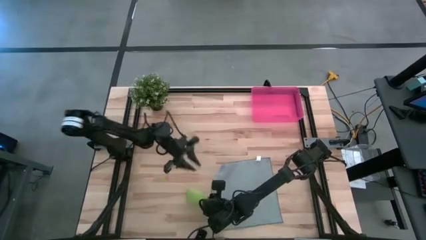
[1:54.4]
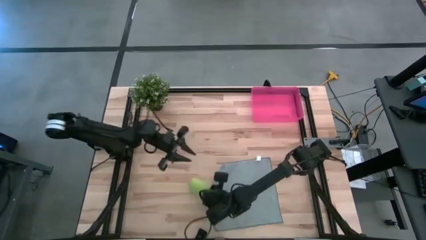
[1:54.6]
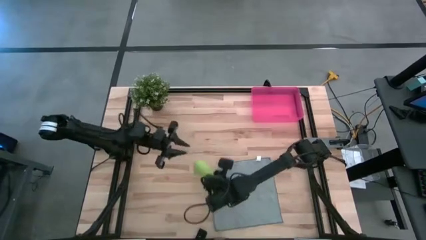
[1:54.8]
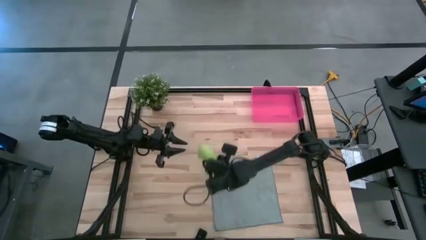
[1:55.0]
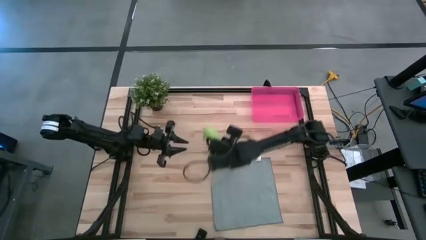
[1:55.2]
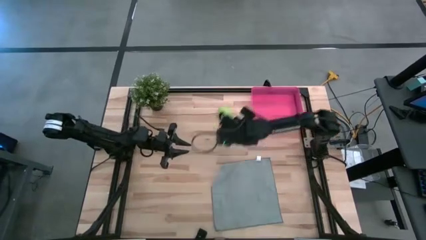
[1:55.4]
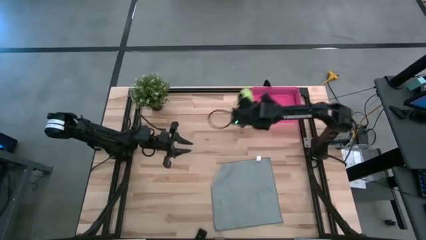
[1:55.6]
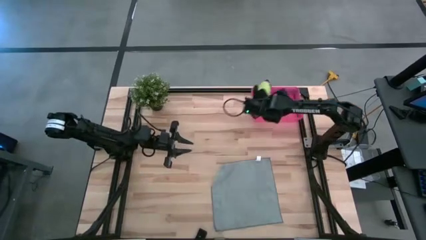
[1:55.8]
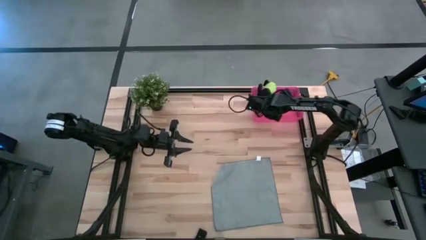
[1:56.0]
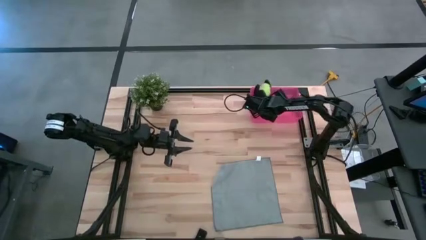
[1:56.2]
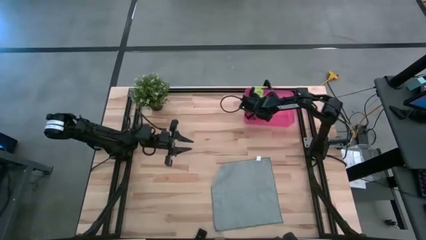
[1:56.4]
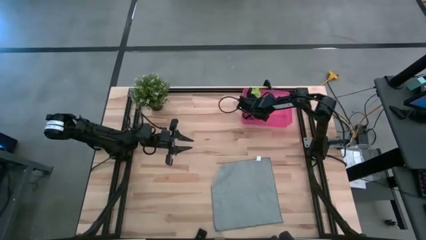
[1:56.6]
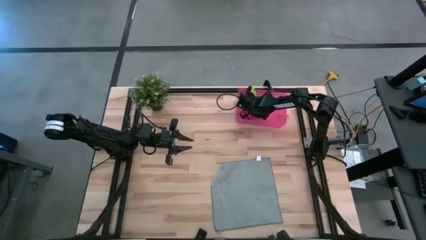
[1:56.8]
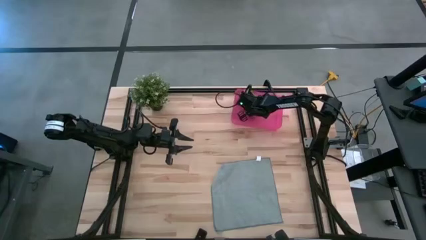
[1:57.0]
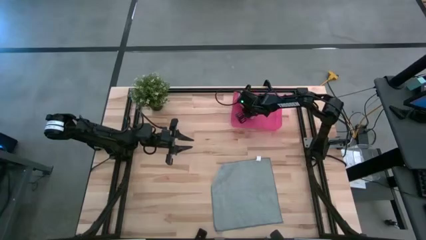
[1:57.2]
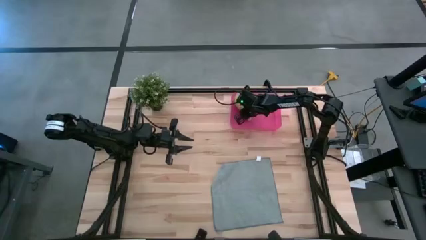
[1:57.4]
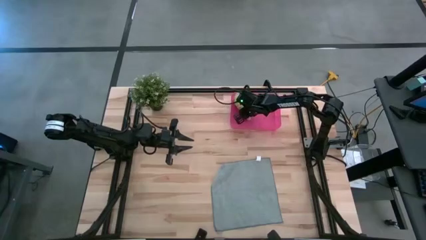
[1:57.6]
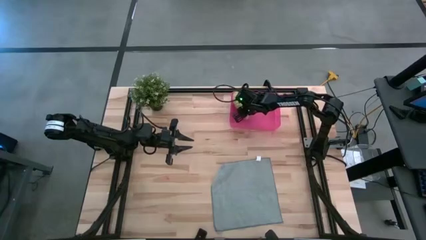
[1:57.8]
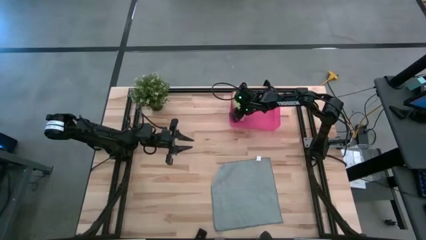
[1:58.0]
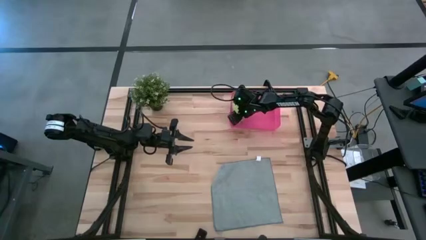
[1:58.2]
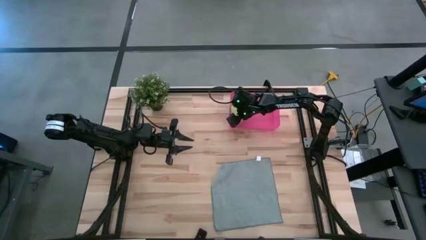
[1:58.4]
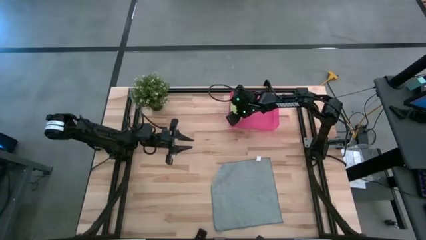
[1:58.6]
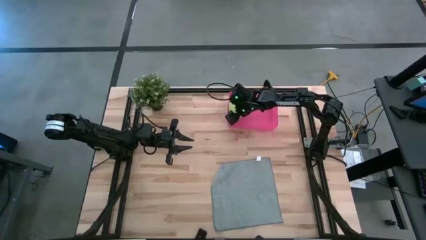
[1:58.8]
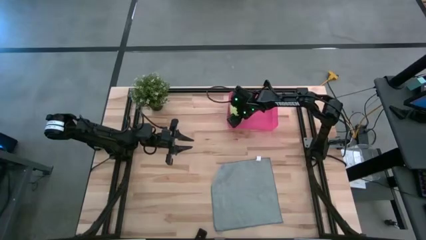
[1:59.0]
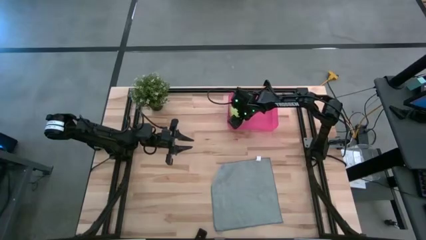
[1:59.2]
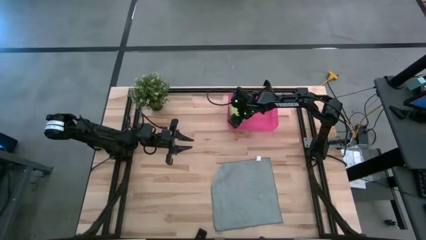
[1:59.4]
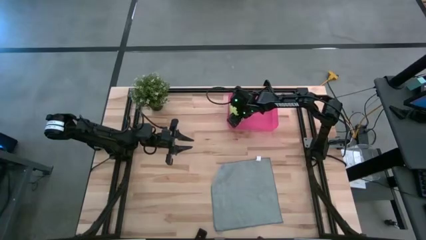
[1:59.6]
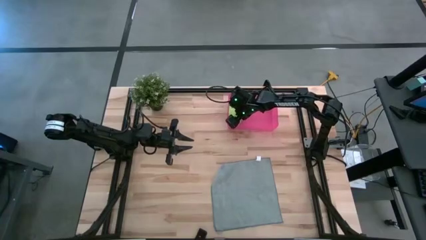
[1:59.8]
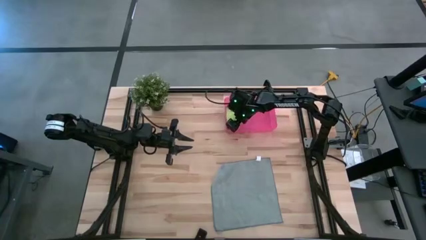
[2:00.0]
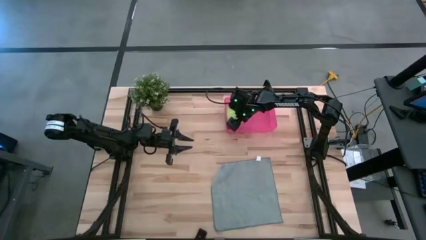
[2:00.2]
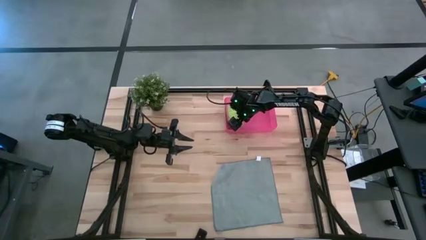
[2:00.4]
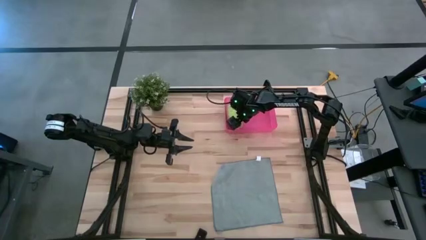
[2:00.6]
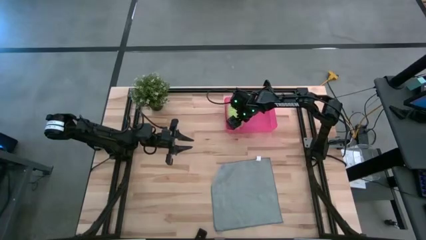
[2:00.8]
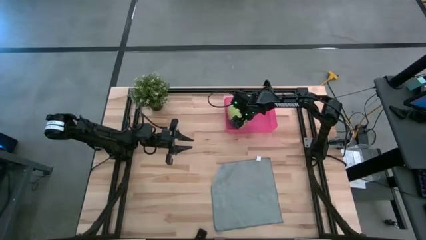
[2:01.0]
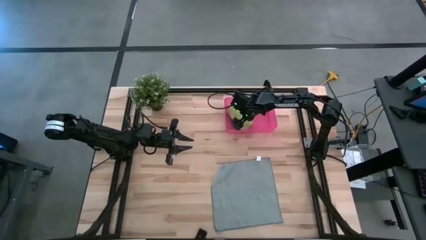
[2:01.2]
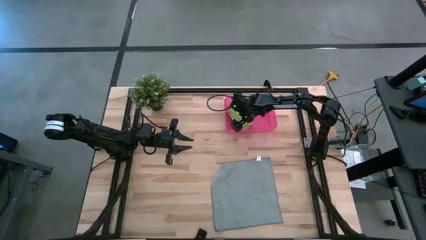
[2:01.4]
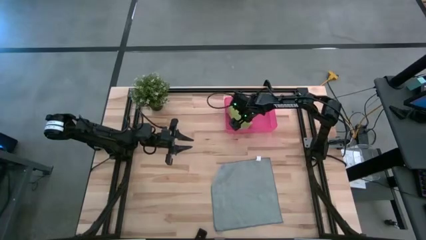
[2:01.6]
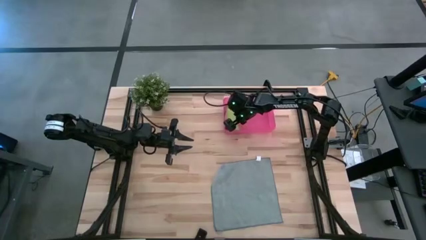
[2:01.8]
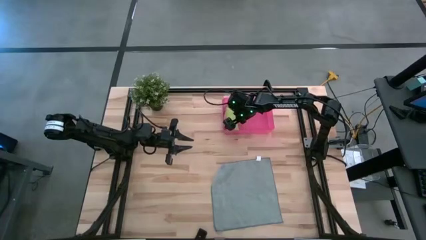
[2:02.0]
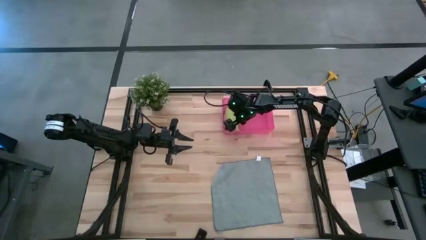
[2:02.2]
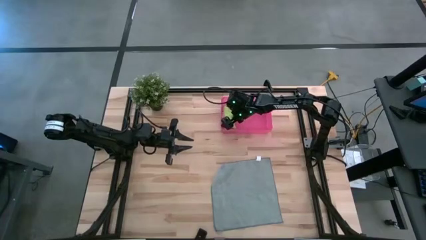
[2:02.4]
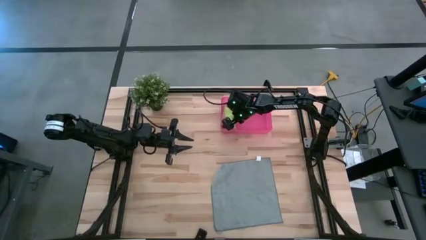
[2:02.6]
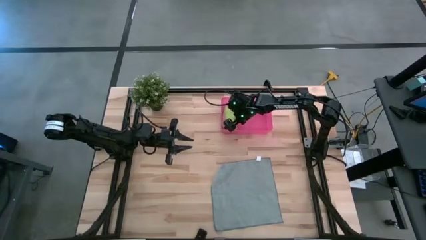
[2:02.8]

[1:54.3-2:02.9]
Task: Roll microfiber towels into tight, uniform cylinder then place into a basket
Put the rolled green microfiber cloth into the pink bin

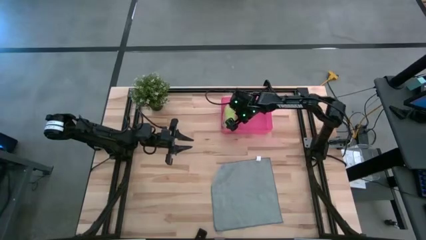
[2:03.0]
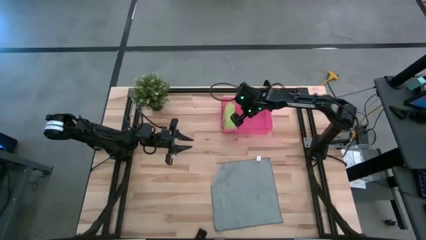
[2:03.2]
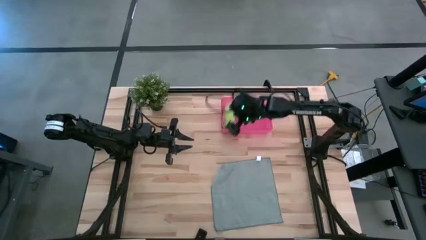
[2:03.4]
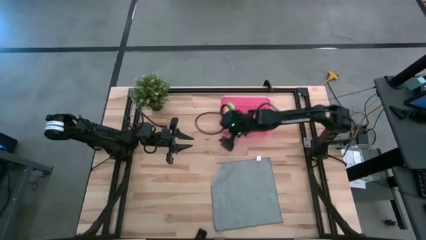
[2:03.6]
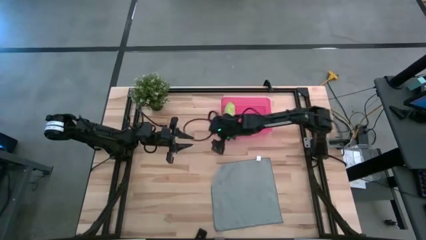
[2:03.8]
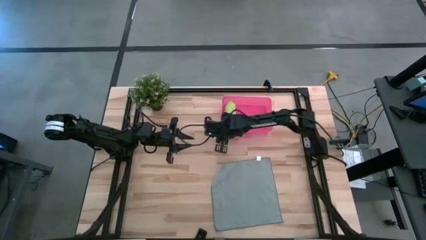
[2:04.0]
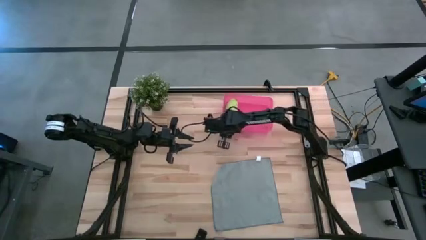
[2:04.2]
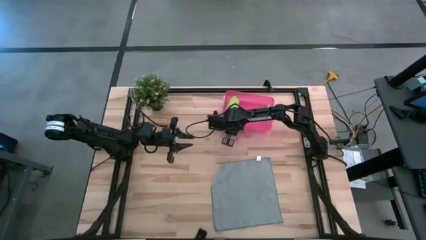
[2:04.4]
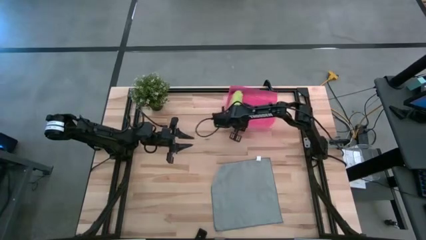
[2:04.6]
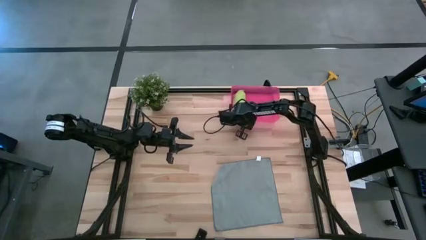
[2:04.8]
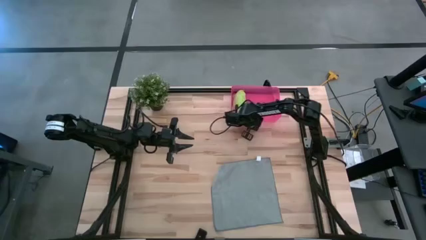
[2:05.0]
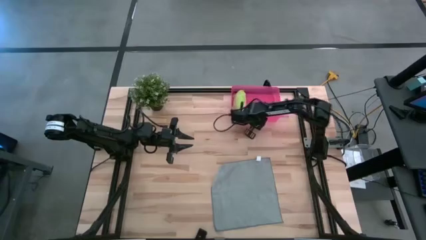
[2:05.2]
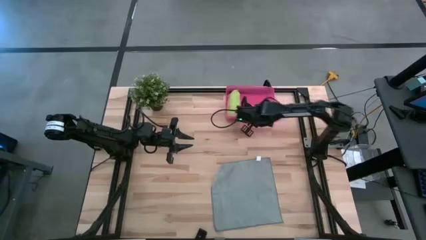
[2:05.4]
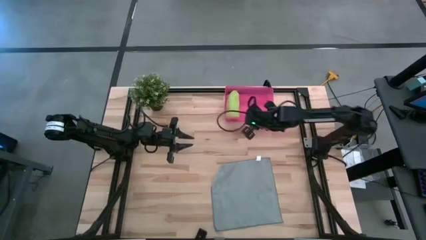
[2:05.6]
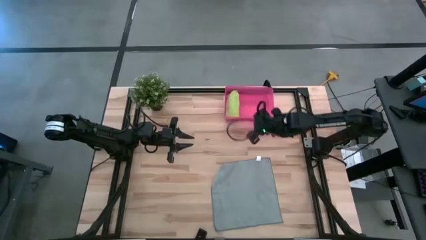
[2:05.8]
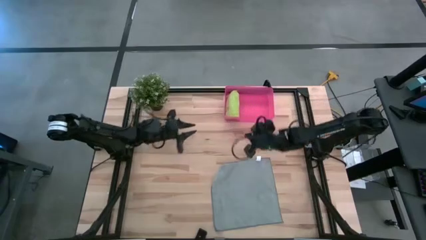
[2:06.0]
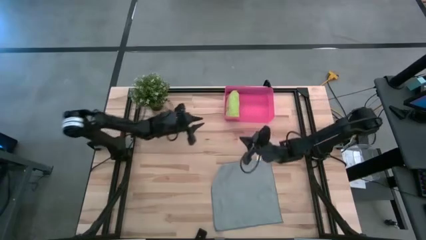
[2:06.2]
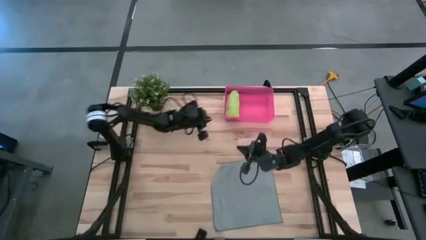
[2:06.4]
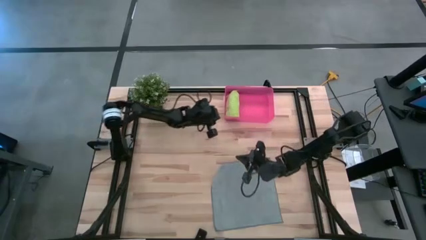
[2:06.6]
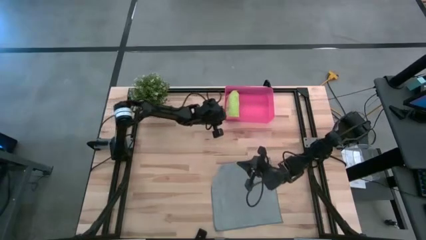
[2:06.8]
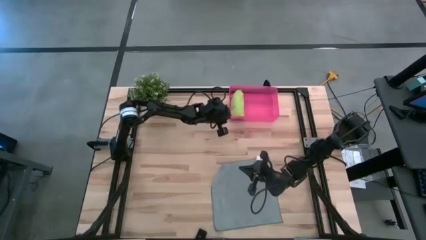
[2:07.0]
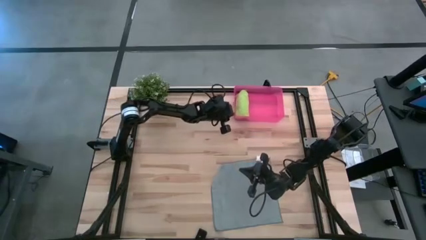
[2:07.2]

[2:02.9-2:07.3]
Adjust the pink bin

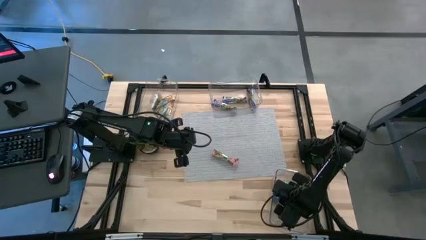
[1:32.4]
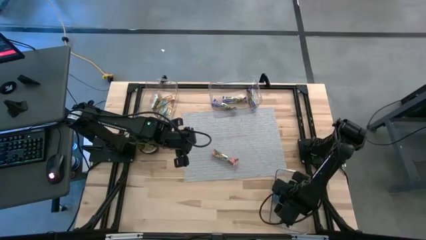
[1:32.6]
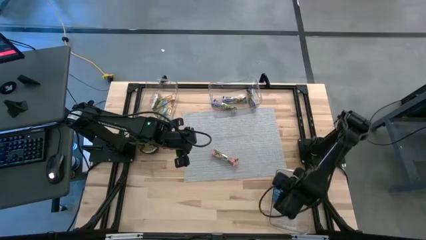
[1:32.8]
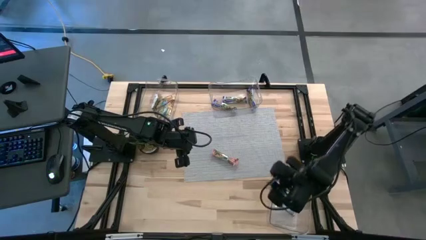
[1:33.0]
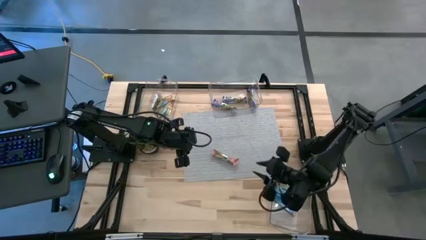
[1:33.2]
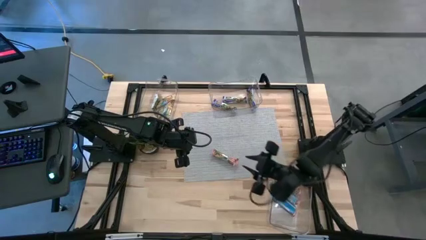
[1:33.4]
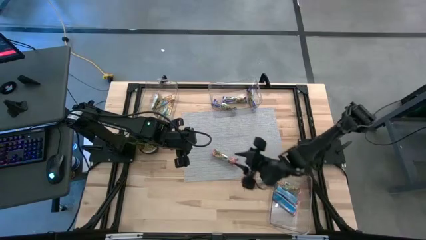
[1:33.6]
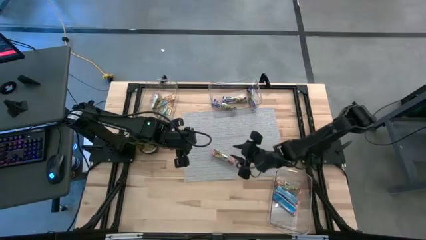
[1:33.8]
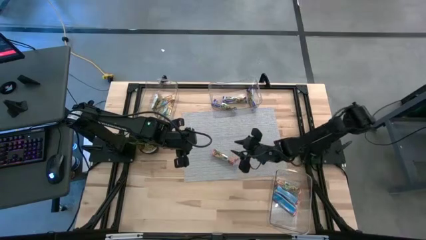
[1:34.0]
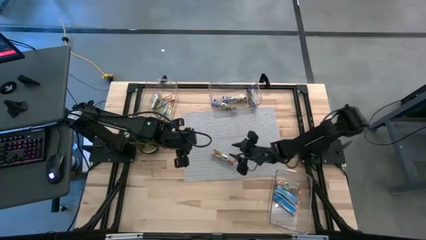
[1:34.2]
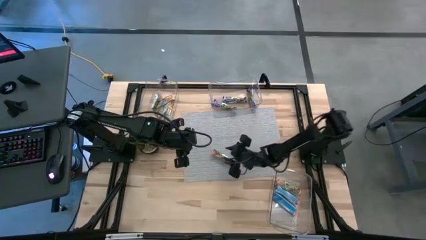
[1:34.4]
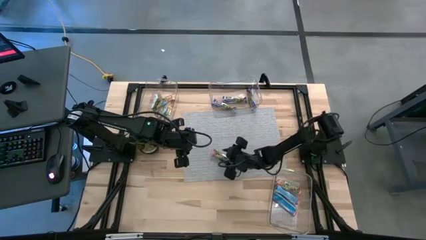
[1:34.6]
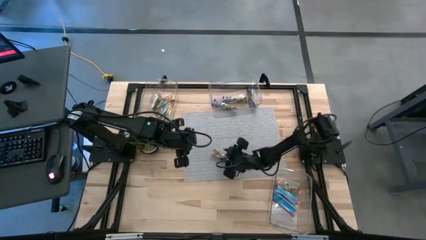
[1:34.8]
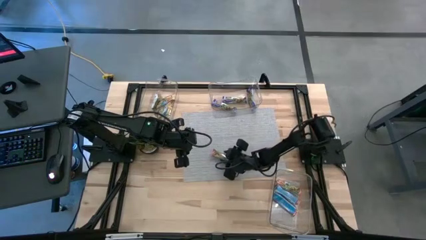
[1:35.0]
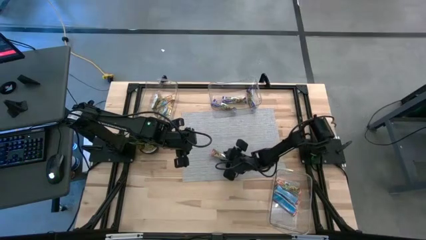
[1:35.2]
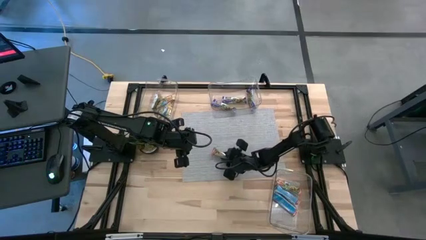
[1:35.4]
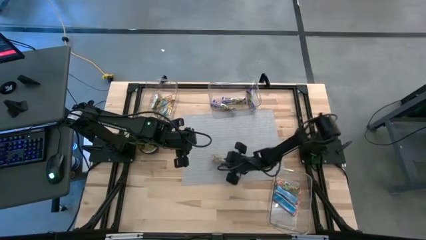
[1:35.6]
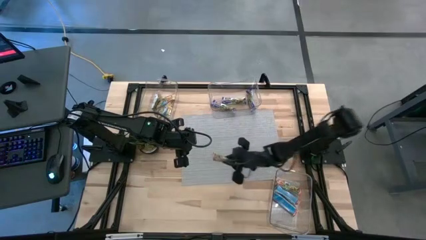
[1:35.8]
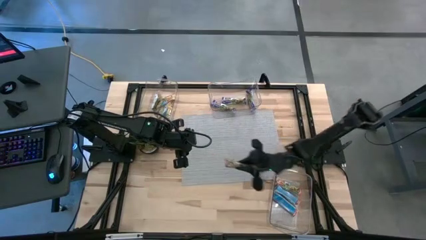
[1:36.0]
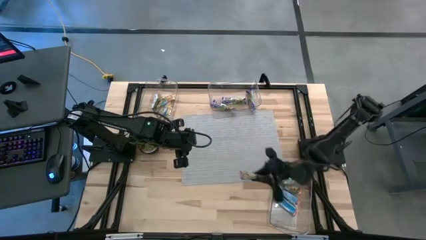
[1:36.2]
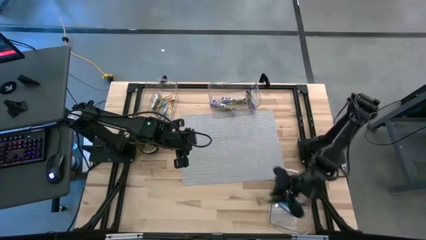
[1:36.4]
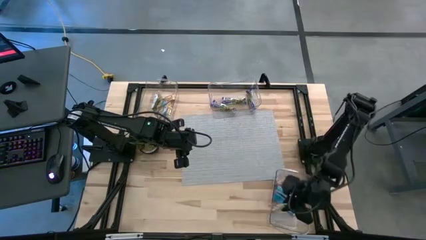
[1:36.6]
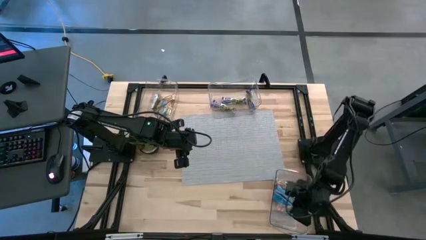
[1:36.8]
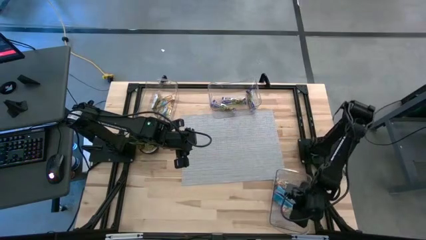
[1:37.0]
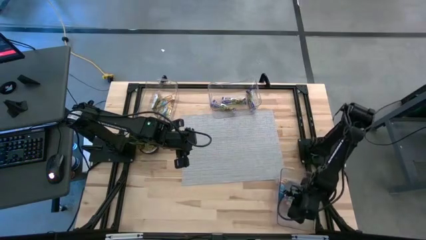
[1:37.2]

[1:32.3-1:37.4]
Task: Pick and place Granola Bars by type
Put the red granola bar into the bottom transparent bin
